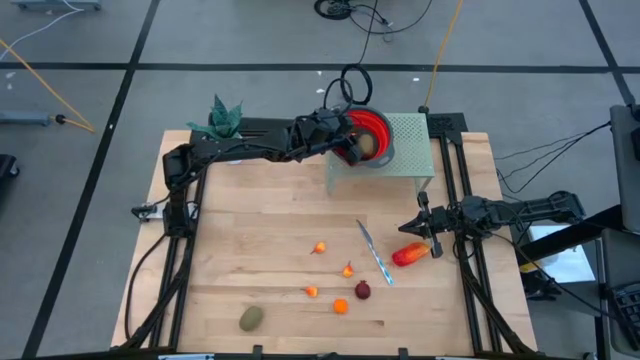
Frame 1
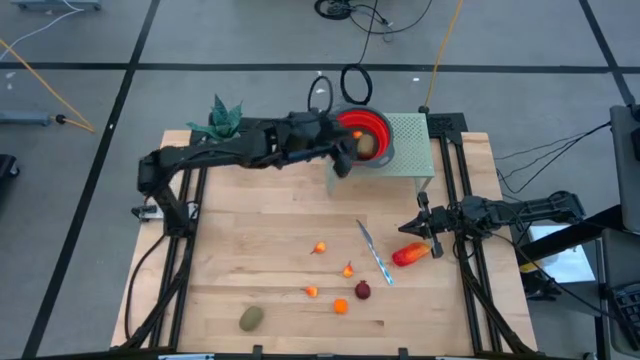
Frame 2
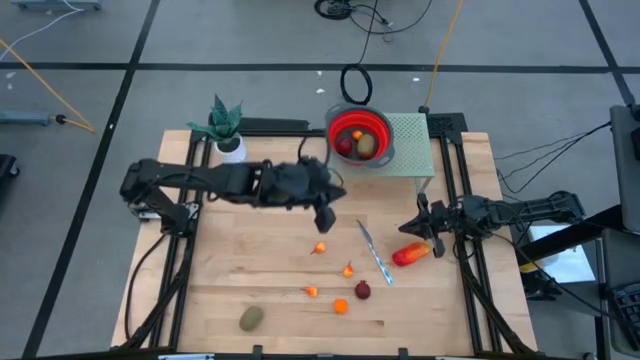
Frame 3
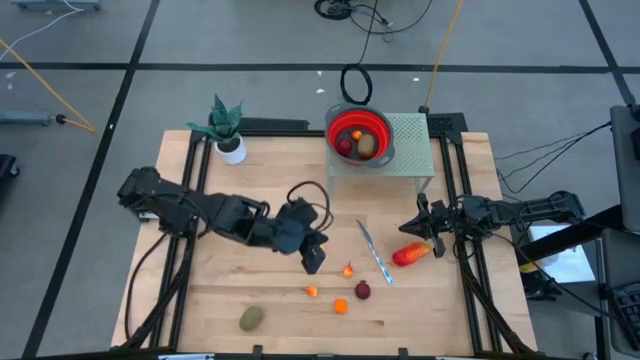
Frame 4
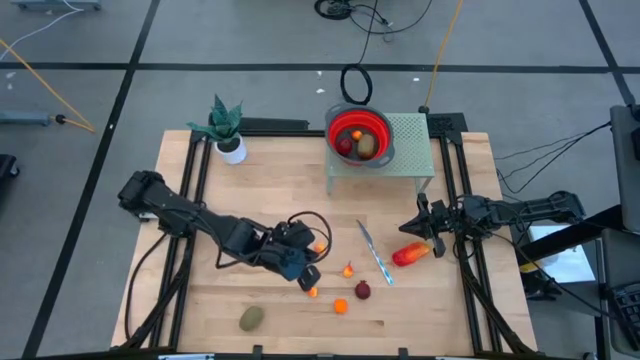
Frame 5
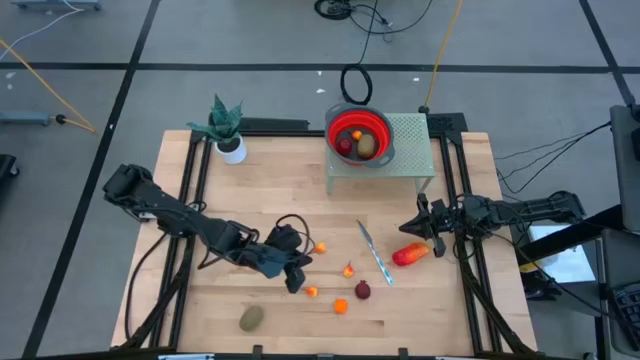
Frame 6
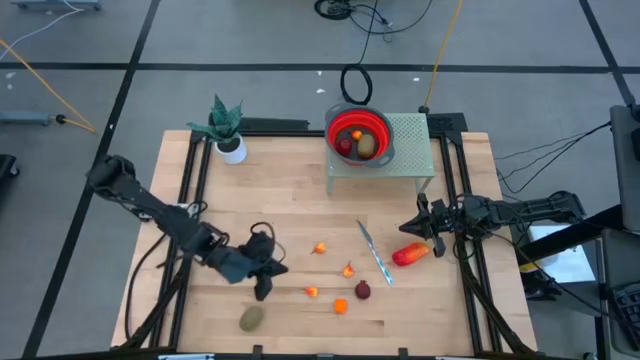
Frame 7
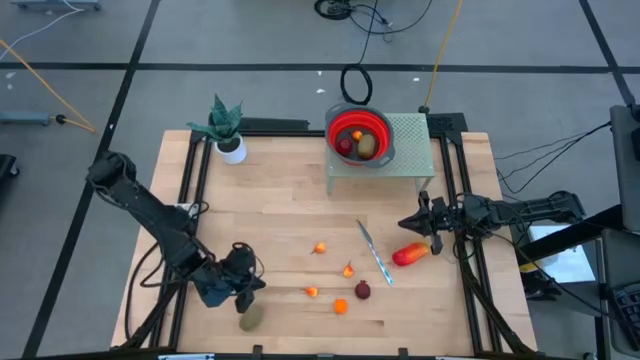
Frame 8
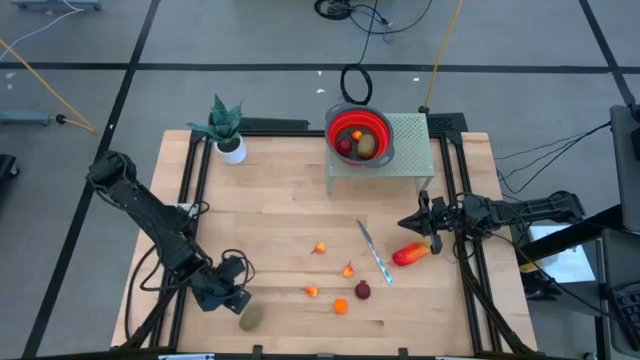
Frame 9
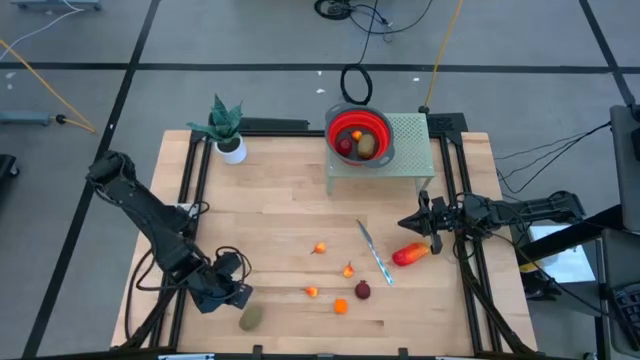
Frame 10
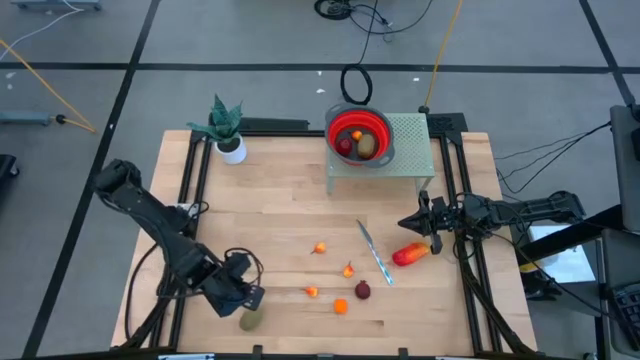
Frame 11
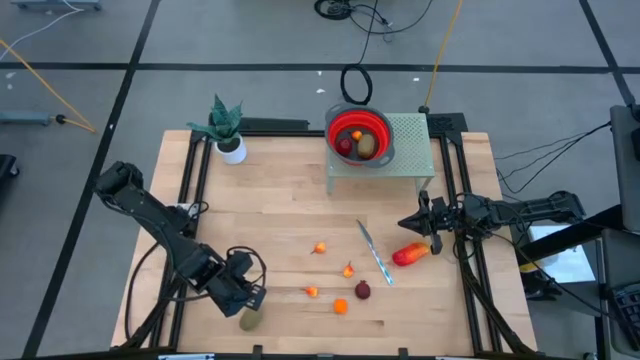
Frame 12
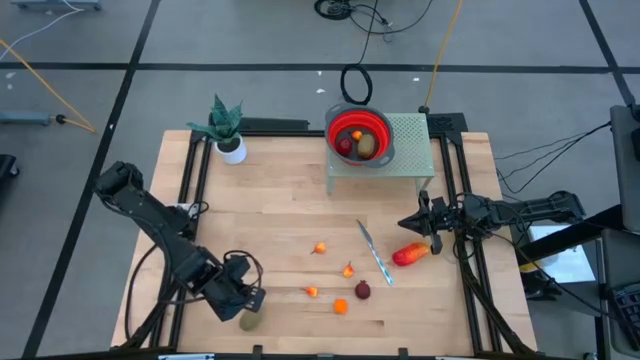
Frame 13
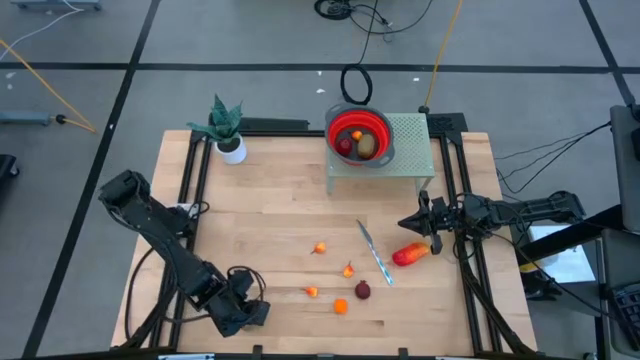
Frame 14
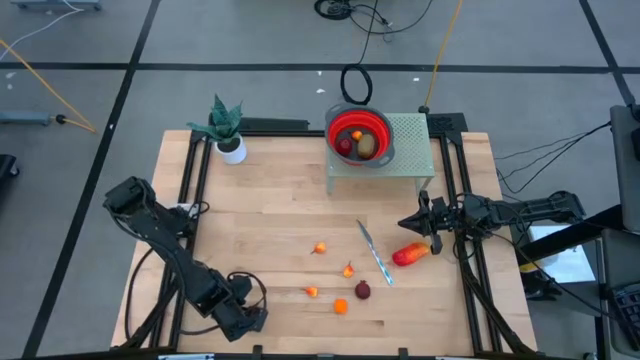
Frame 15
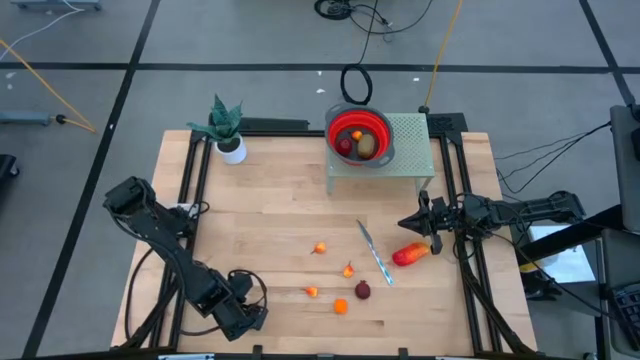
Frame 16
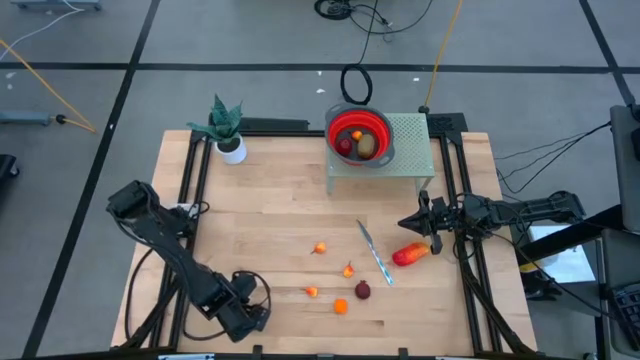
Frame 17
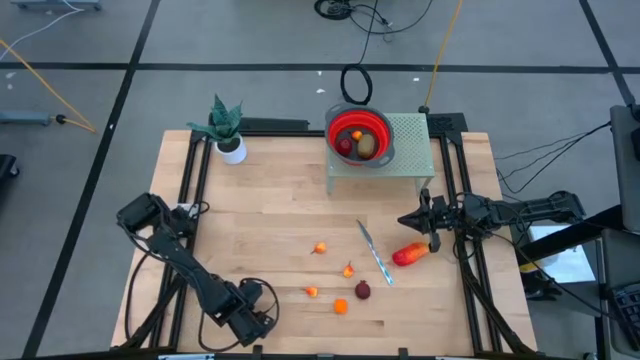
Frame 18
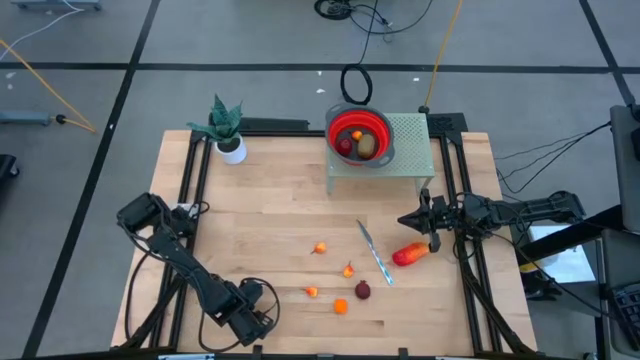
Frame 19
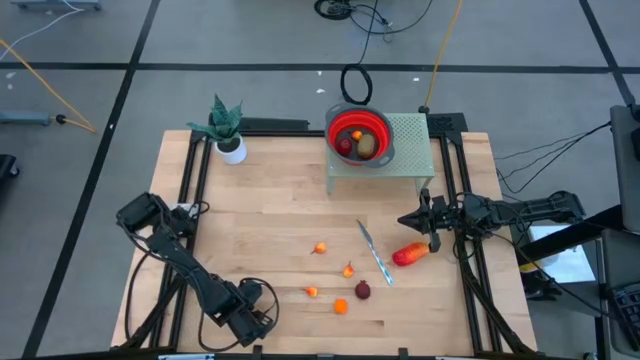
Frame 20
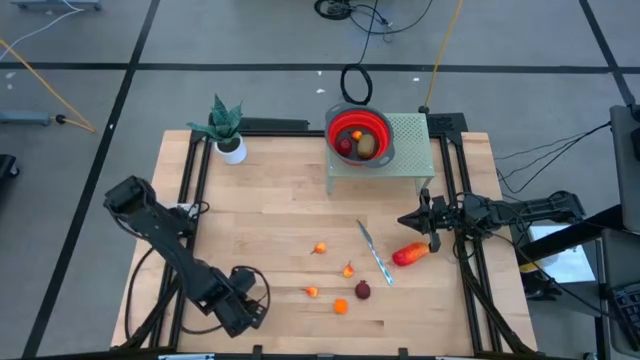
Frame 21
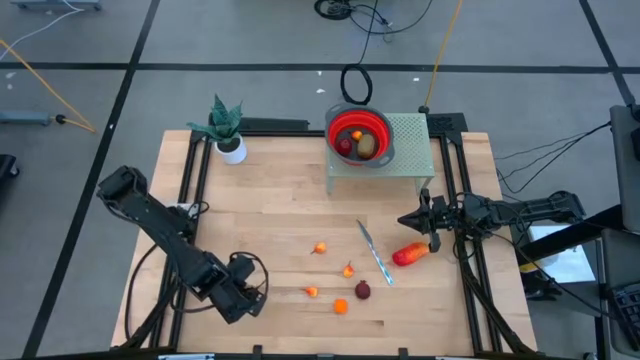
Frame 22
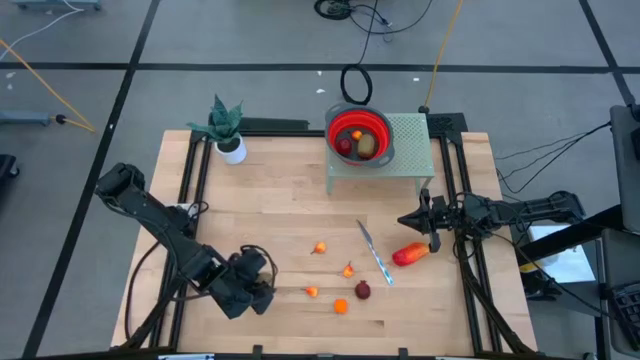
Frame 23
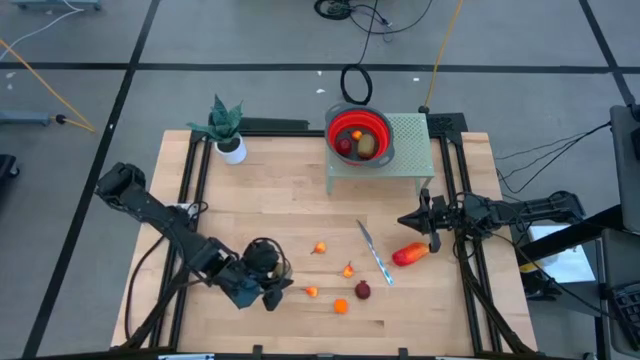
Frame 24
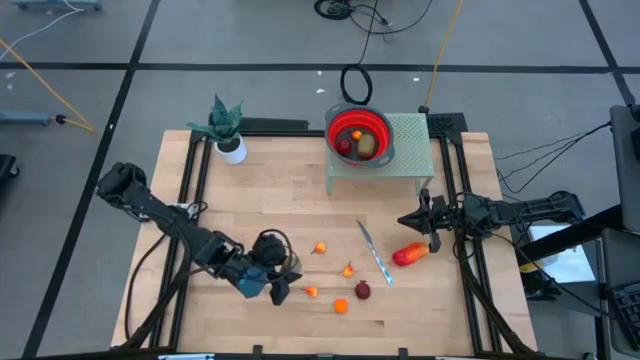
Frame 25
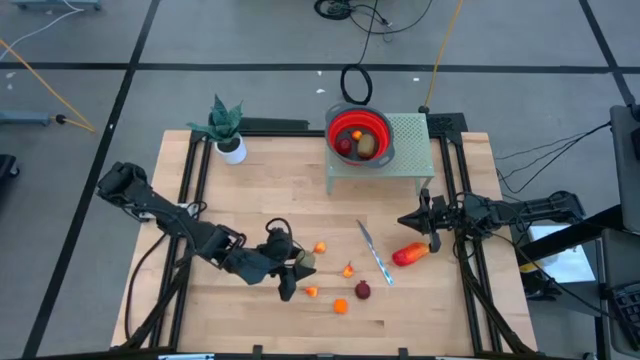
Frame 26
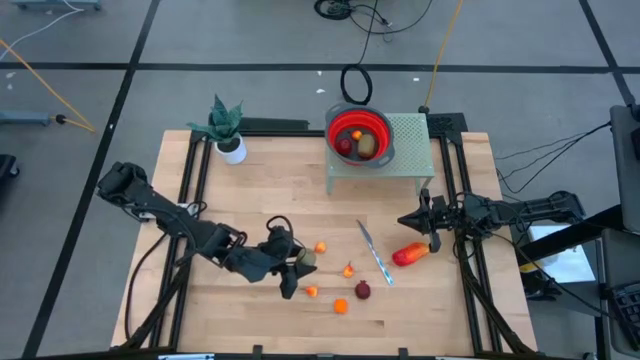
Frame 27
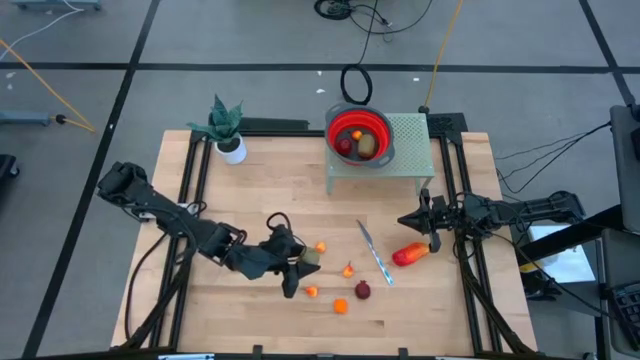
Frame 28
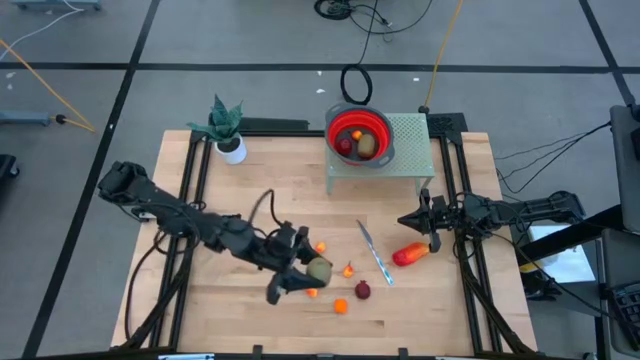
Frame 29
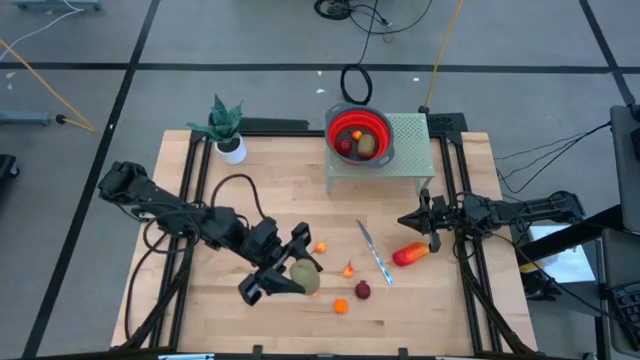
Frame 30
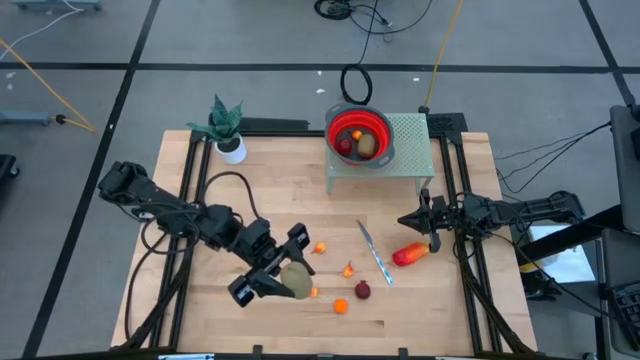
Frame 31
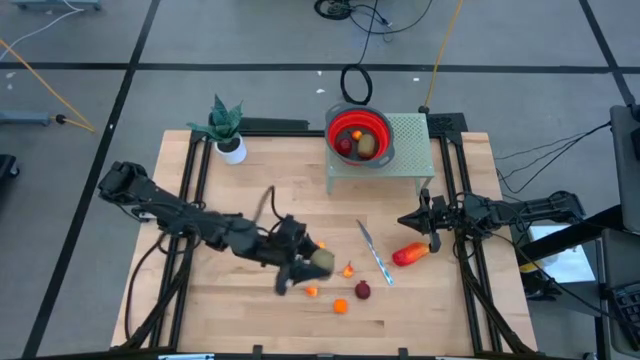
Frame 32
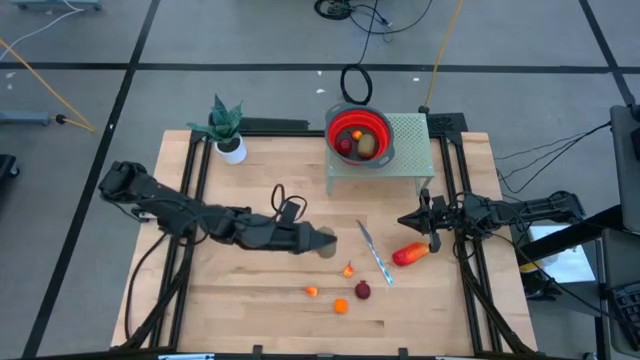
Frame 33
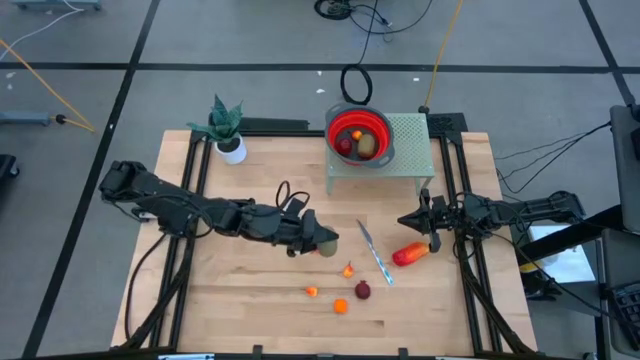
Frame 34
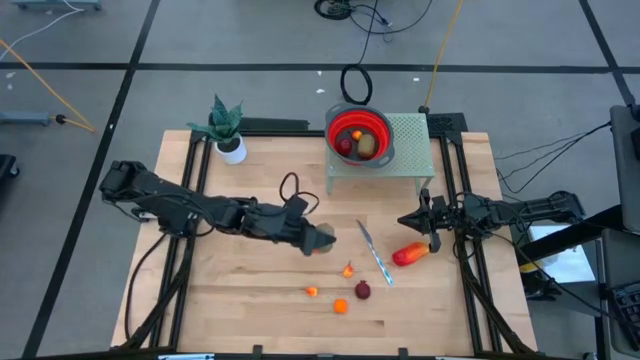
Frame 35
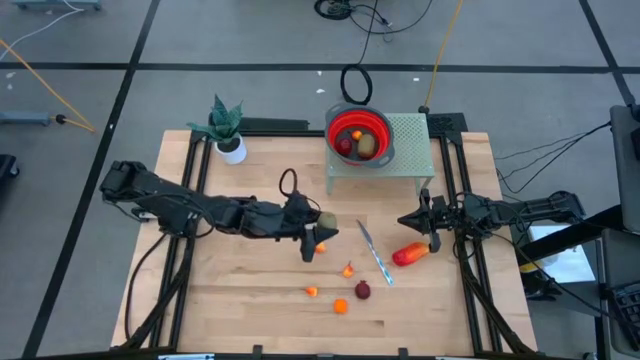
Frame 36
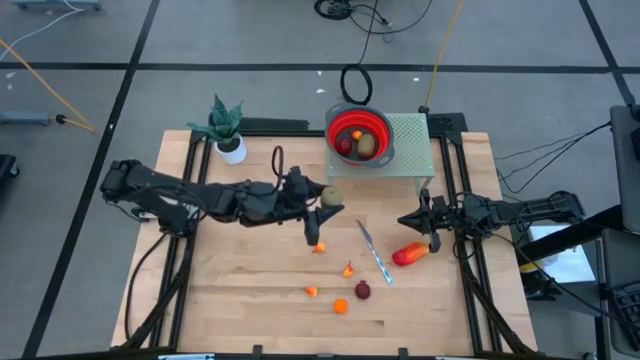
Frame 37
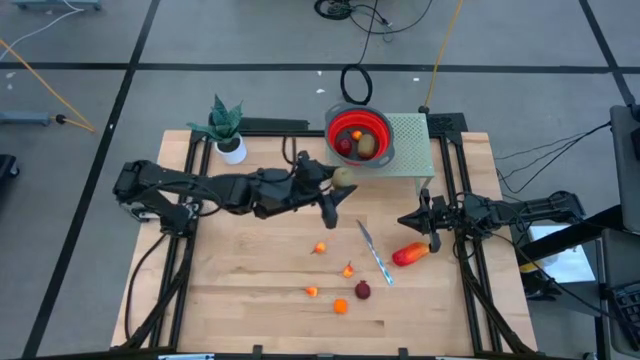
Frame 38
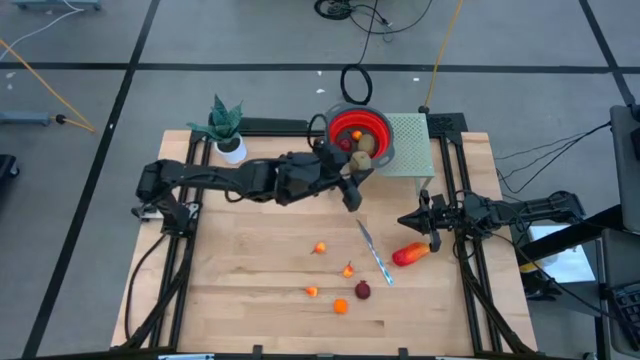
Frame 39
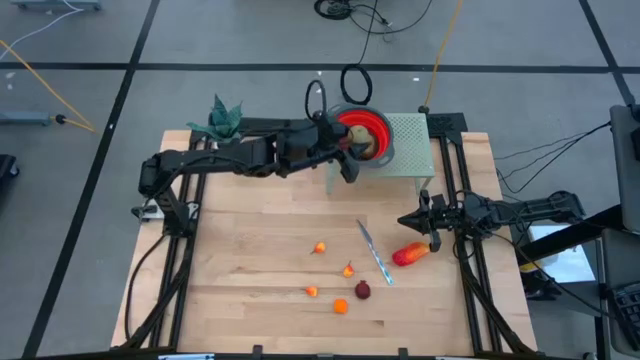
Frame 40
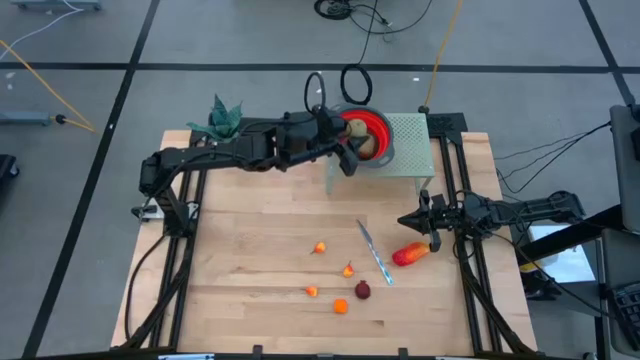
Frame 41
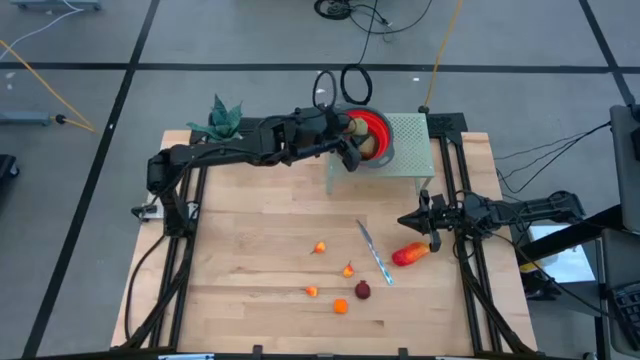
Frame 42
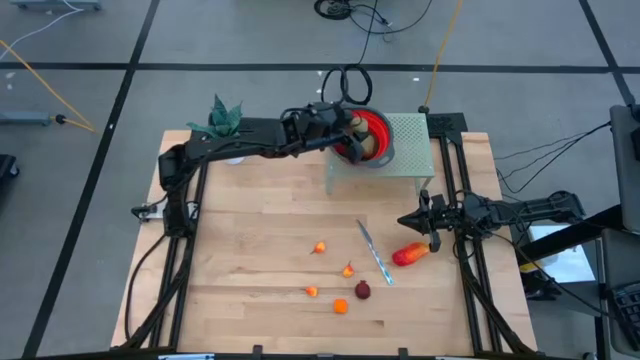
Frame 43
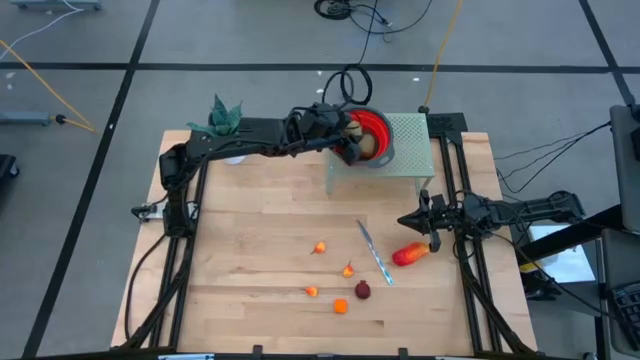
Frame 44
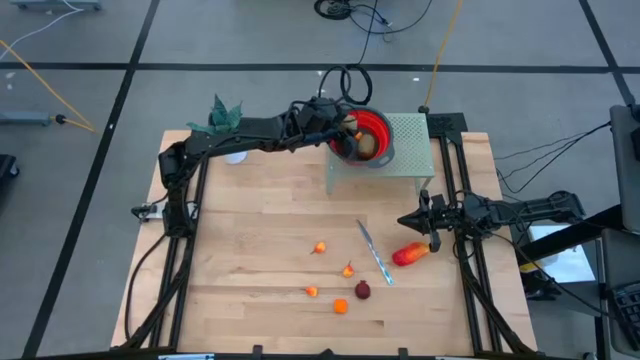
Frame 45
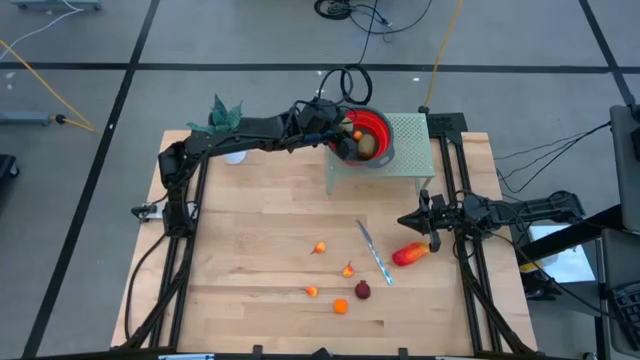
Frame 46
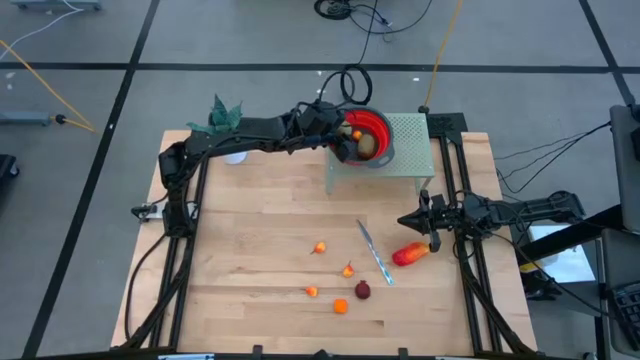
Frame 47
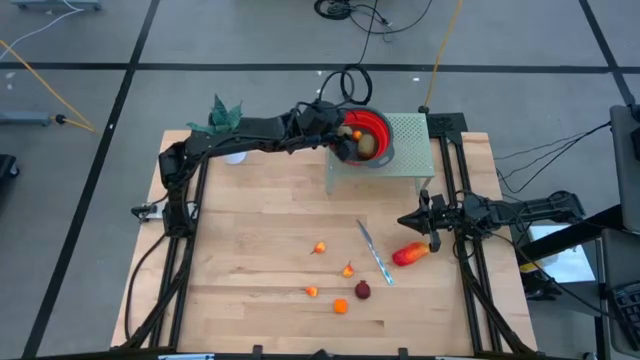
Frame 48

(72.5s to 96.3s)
Task: Pick & Place Fruit
Put the brown kiwi fruit into the red basket on the shelf
